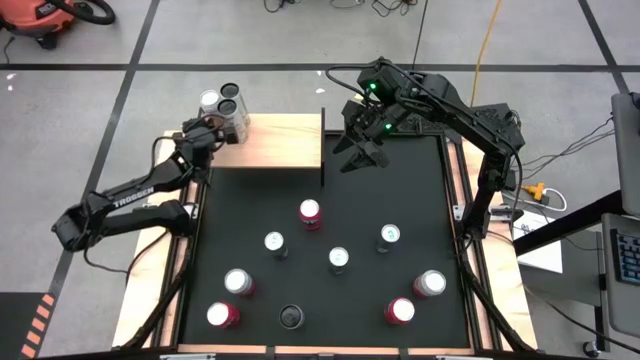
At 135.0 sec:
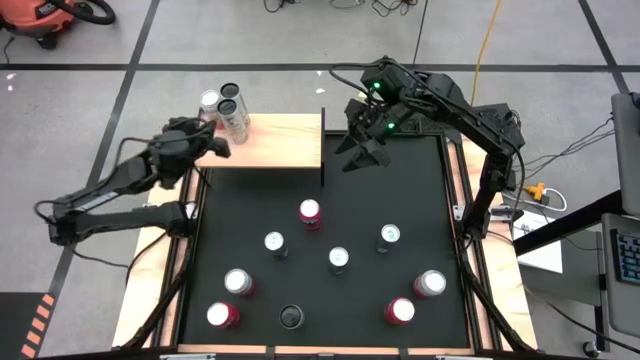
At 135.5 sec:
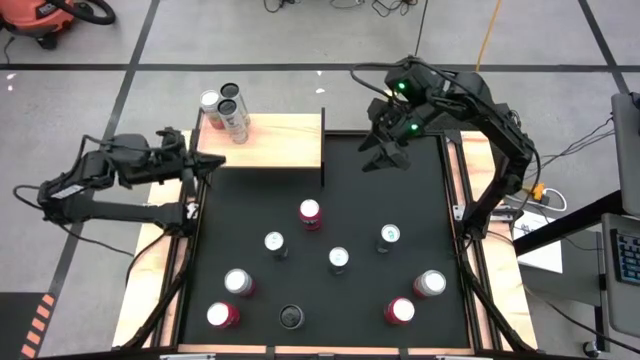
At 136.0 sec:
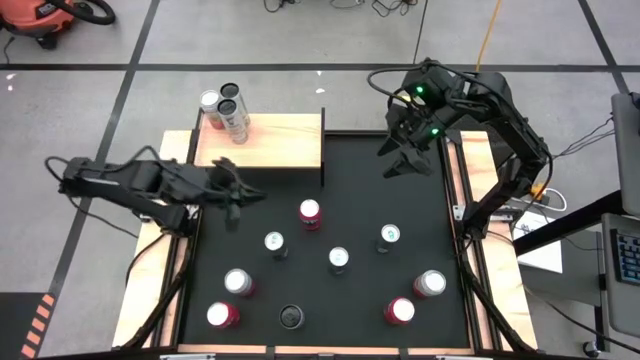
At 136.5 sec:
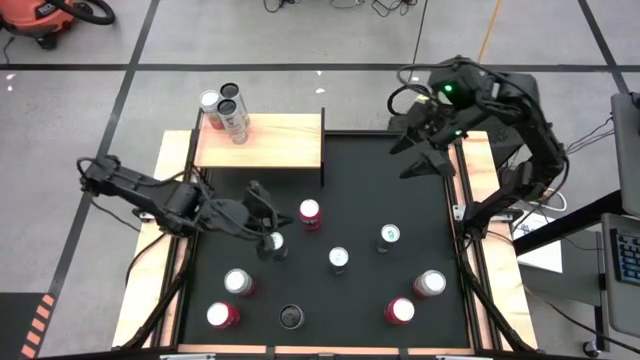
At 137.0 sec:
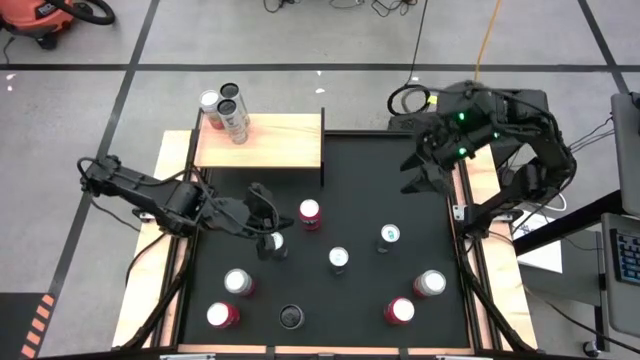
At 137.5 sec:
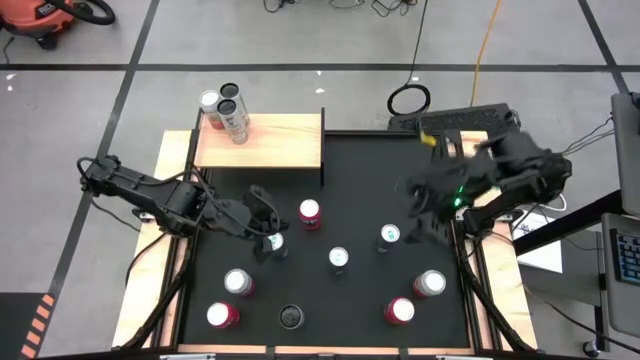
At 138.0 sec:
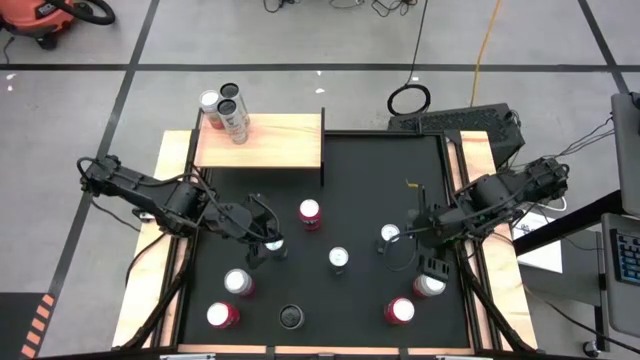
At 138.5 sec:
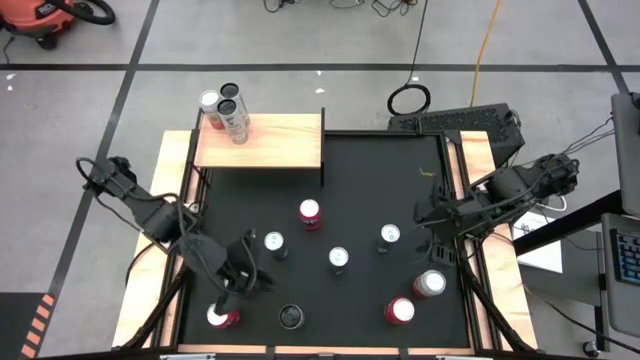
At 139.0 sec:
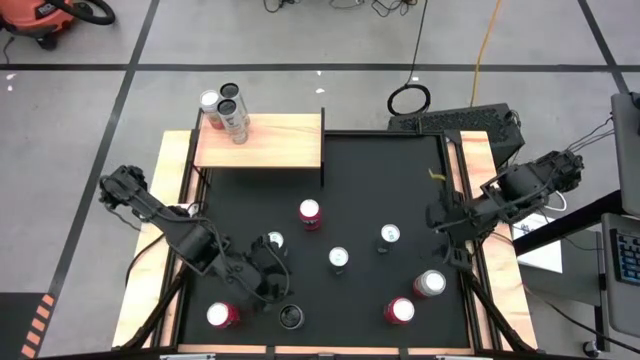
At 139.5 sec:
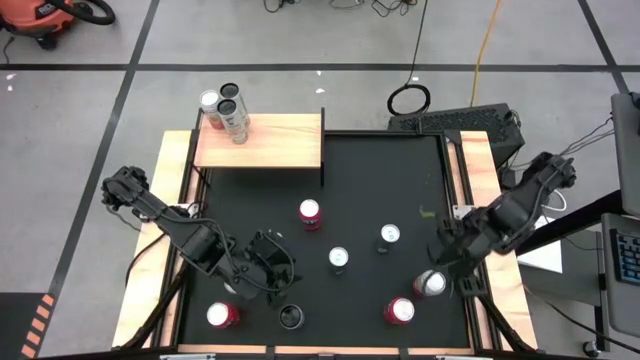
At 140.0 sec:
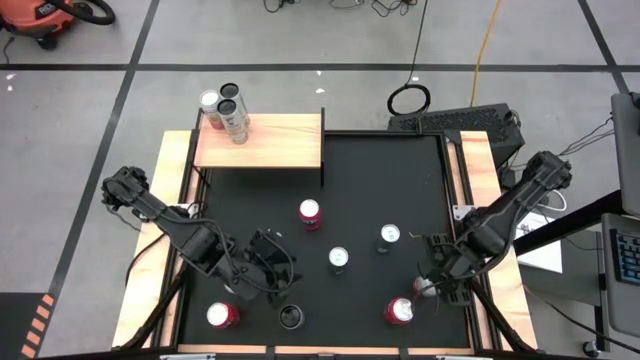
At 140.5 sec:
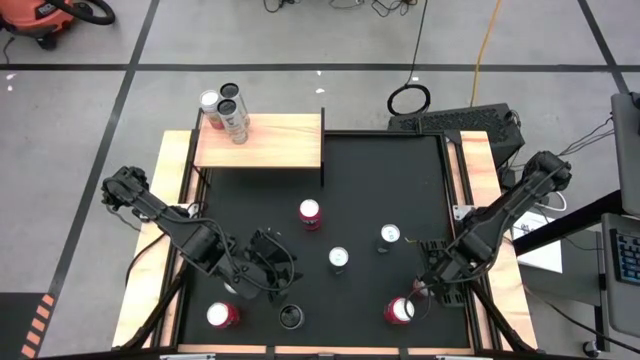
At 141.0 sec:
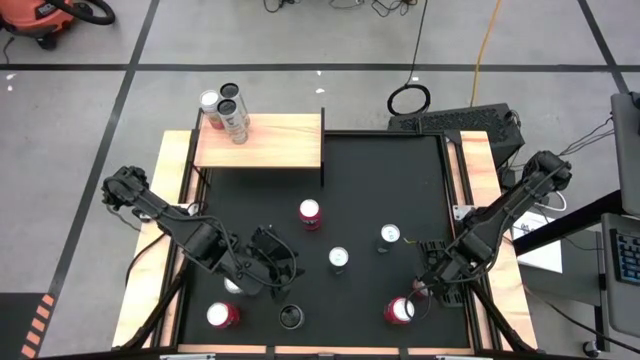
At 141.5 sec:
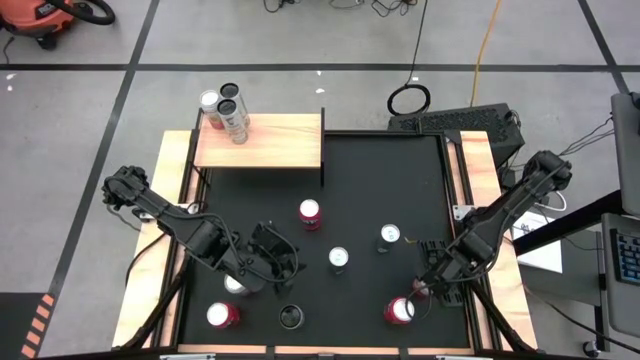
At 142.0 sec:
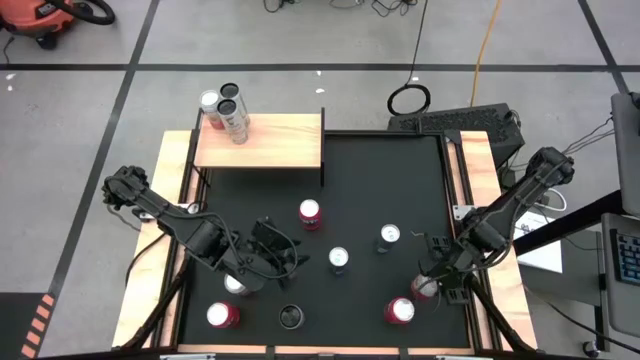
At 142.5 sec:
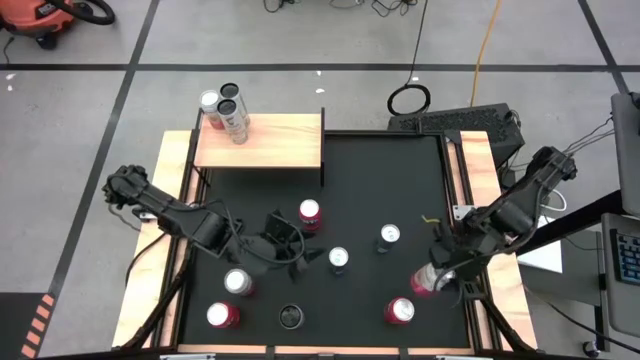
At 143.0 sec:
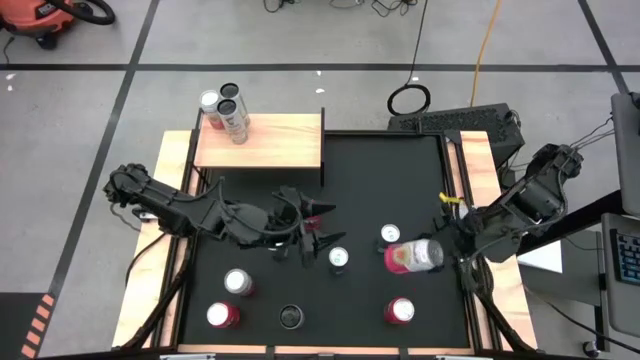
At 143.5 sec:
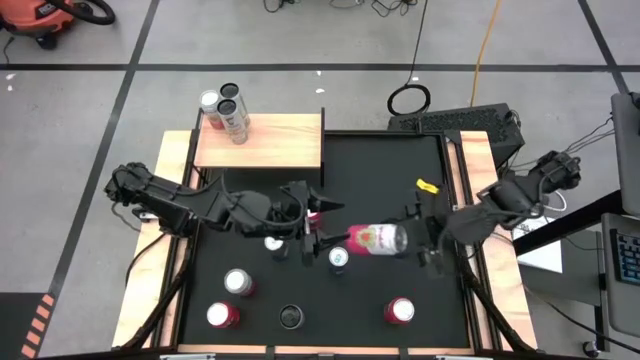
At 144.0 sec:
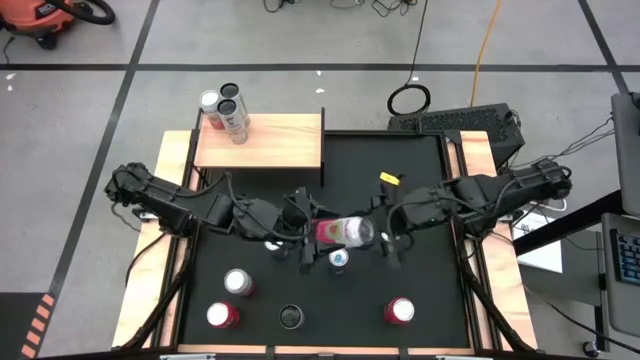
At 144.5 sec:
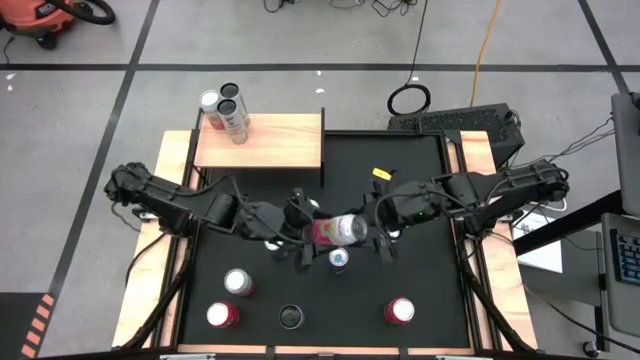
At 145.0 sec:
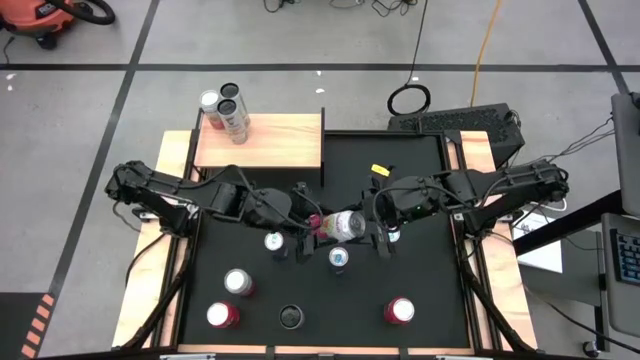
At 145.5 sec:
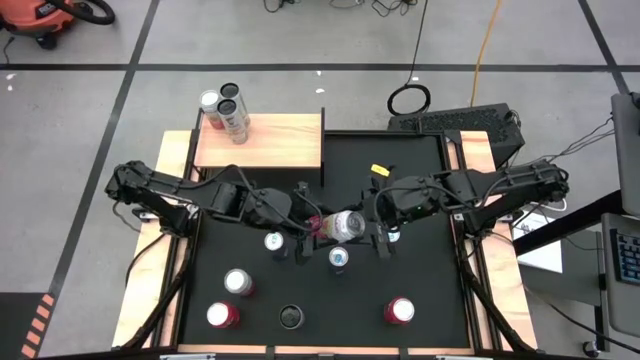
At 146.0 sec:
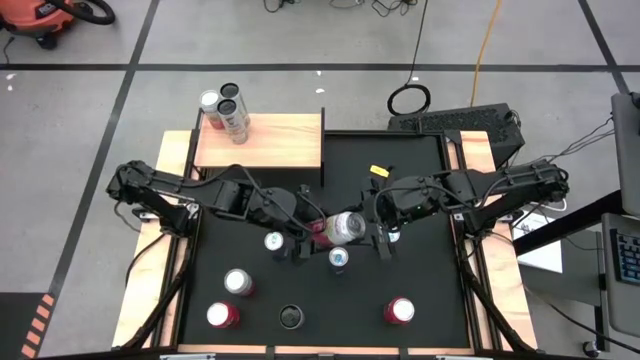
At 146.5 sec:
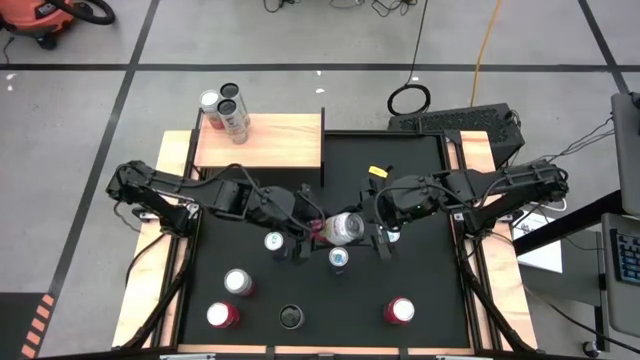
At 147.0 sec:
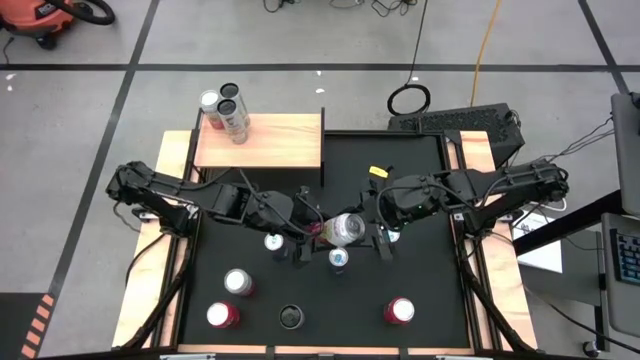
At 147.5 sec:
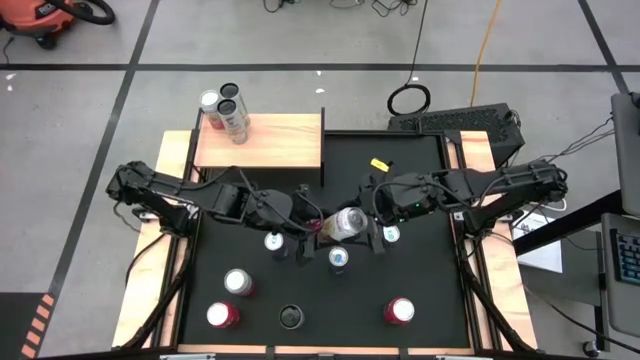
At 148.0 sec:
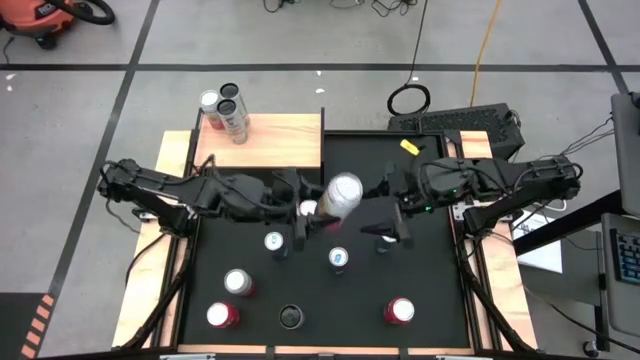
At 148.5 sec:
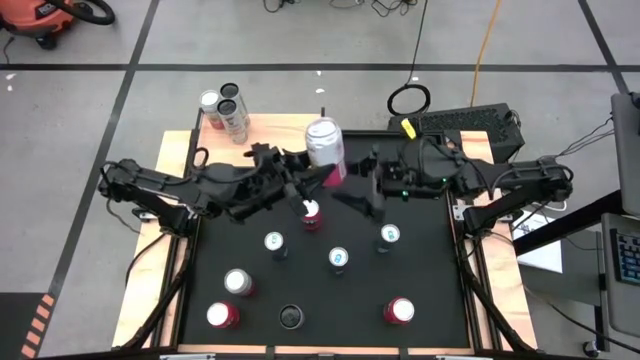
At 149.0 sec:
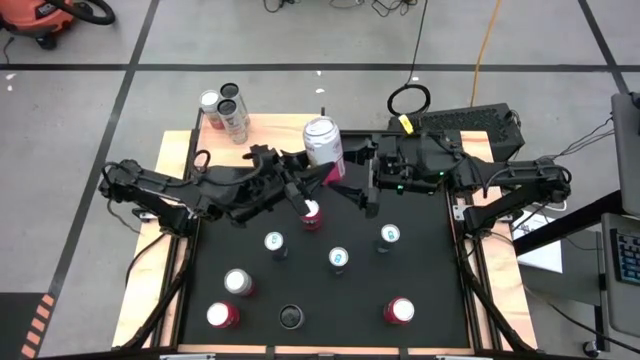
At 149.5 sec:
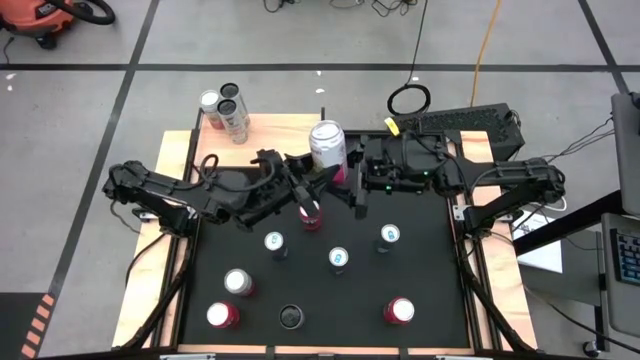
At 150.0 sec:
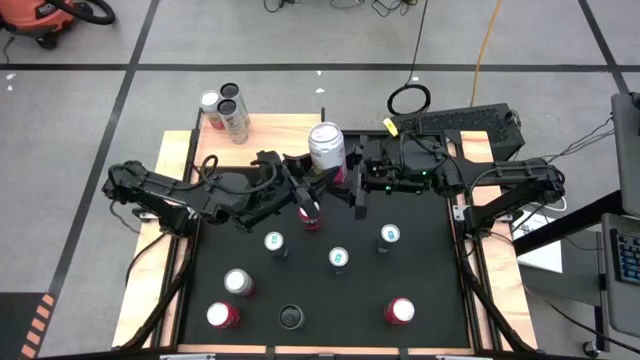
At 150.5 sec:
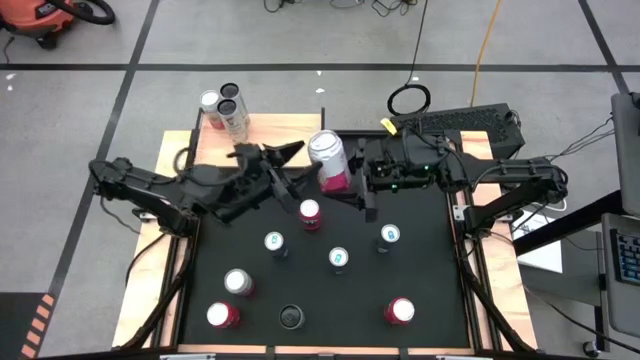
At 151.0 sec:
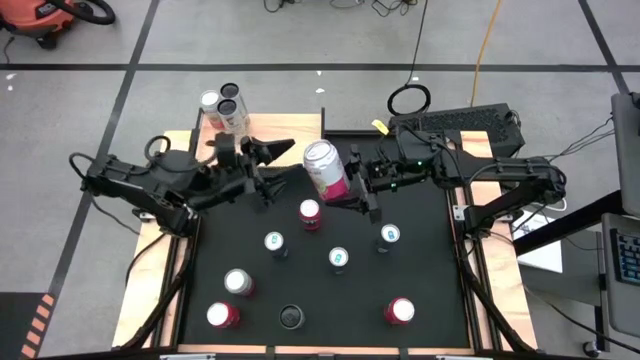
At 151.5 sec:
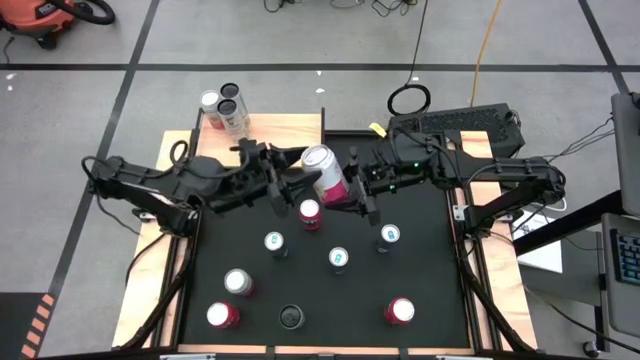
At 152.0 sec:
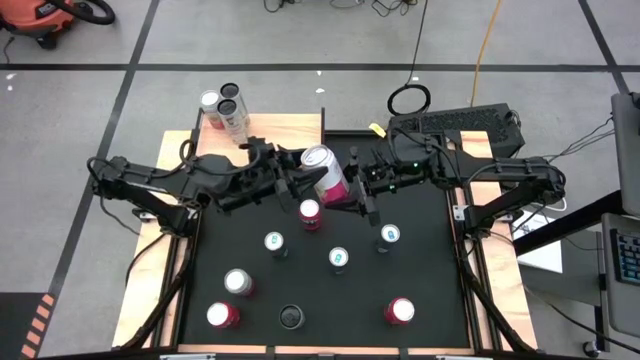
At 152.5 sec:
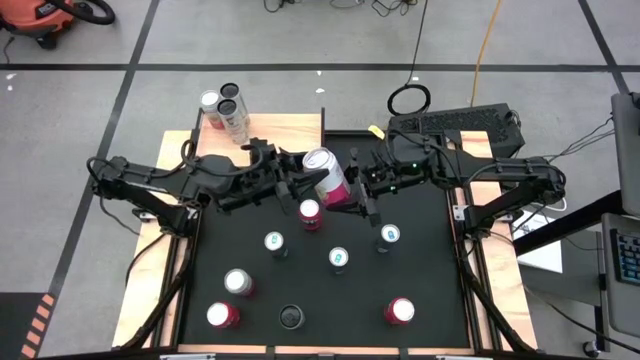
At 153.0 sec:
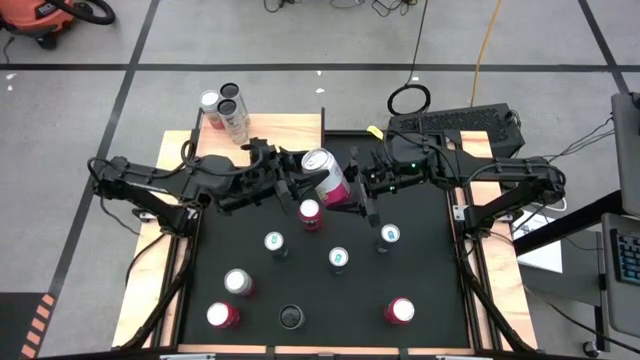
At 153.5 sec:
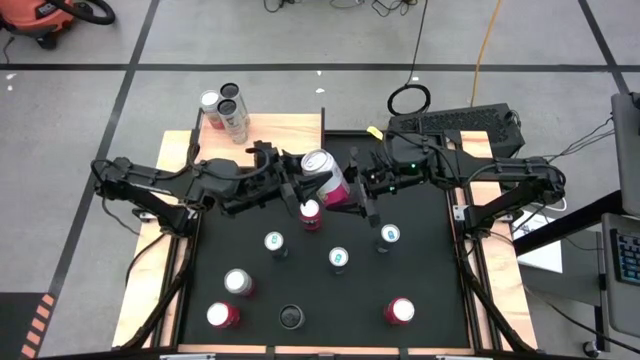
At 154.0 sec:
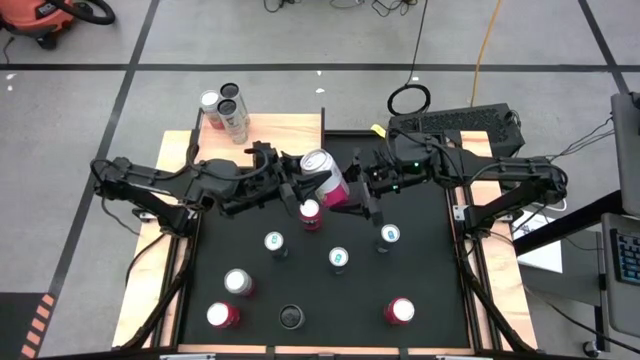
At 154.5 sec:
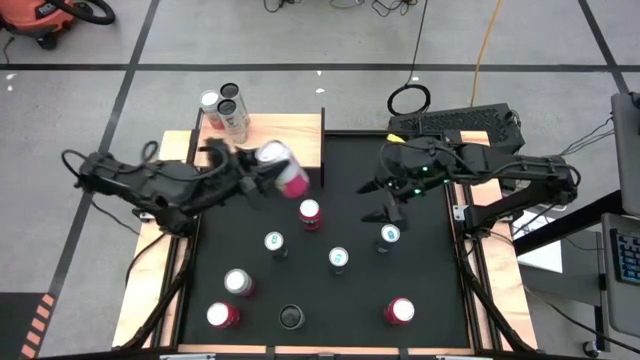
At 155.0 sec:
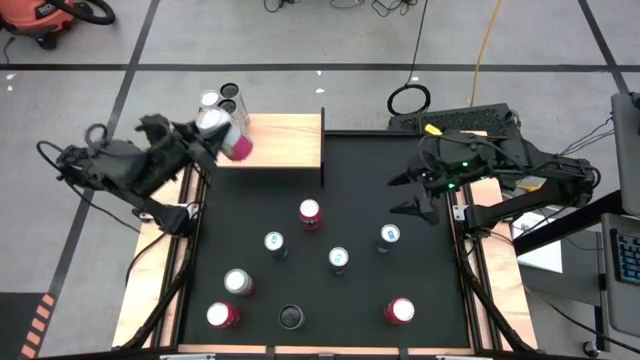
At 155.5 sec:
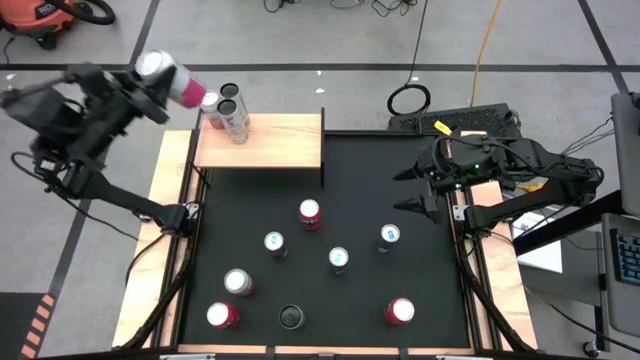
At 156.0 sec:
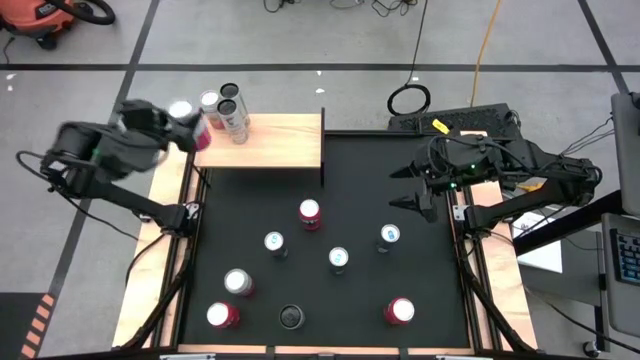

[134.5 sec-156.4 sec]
Task: Place canned beverage on shelf
Put the right pink soda can on the shelf aligned with the other pink soda can
